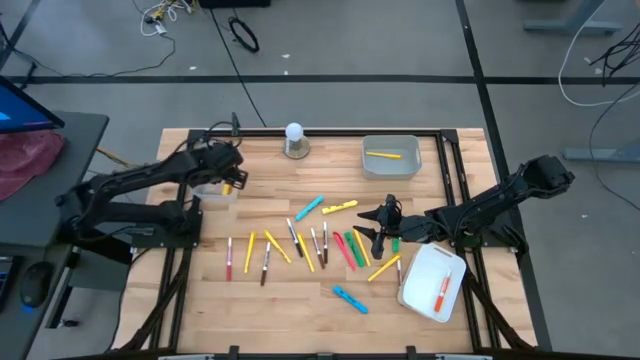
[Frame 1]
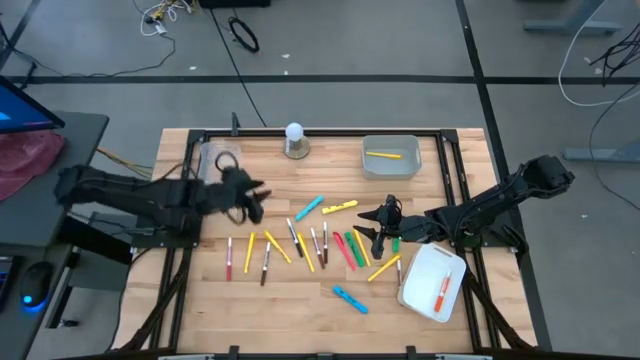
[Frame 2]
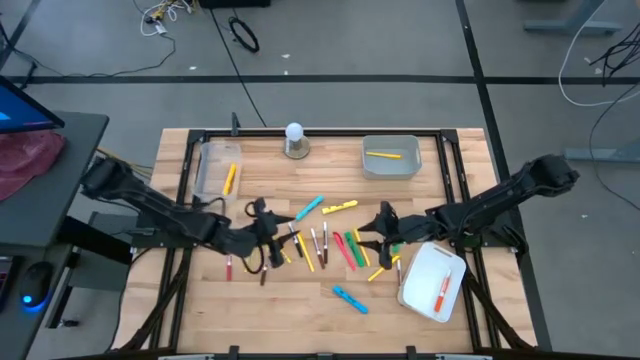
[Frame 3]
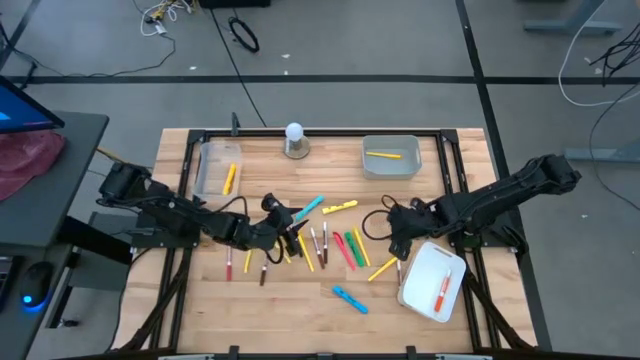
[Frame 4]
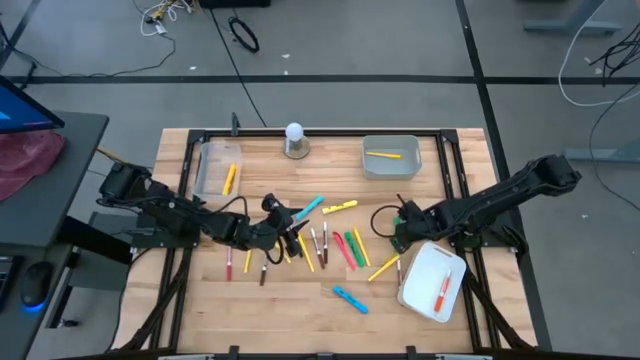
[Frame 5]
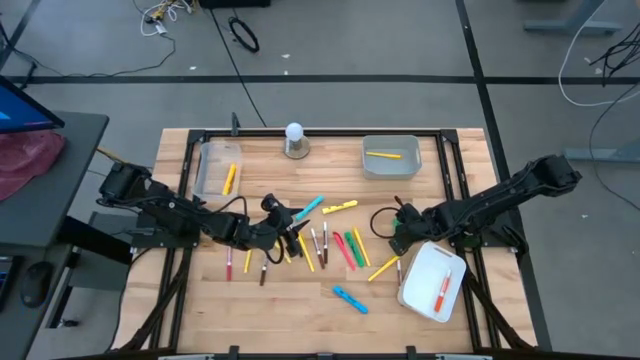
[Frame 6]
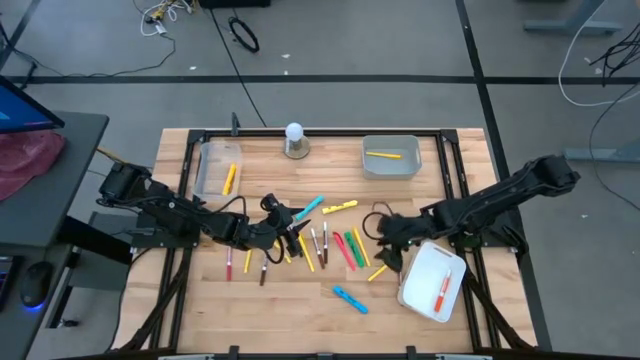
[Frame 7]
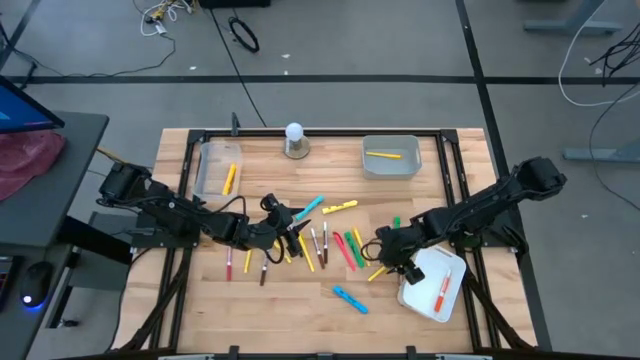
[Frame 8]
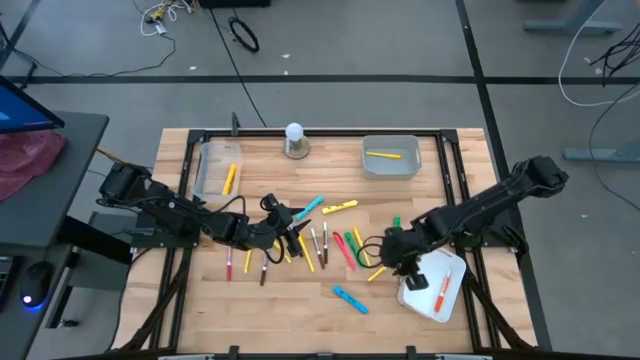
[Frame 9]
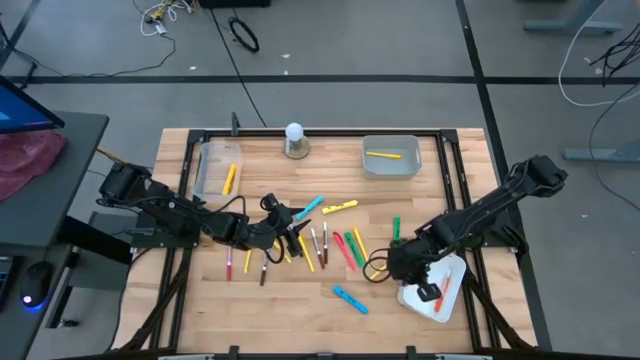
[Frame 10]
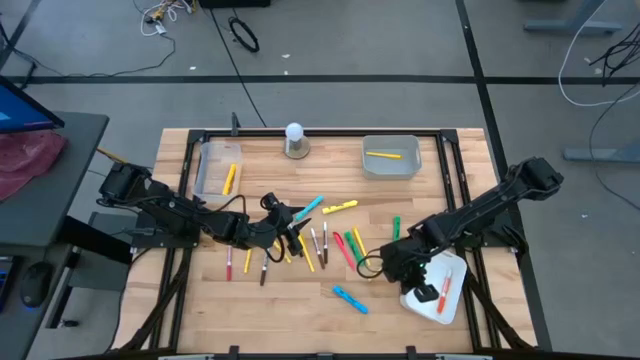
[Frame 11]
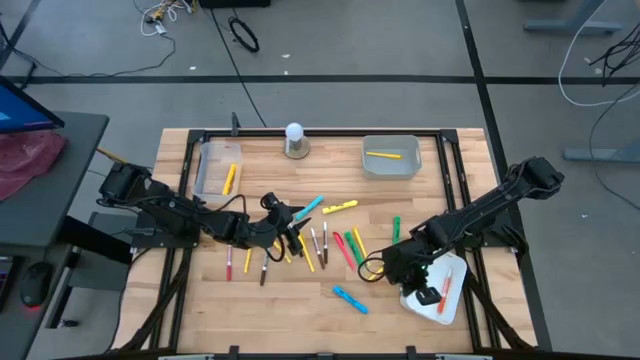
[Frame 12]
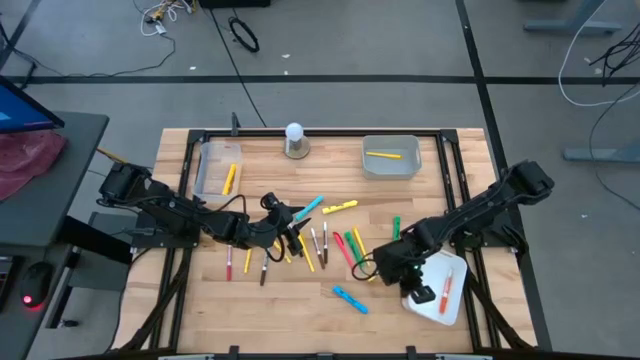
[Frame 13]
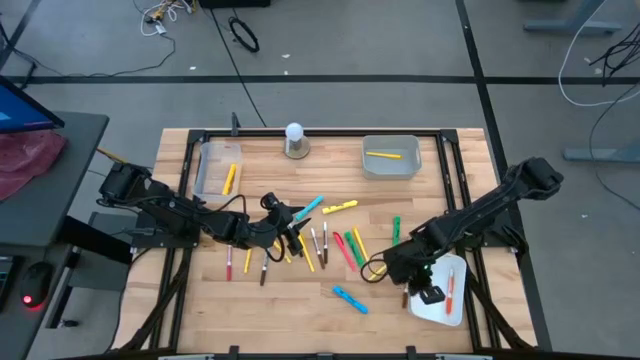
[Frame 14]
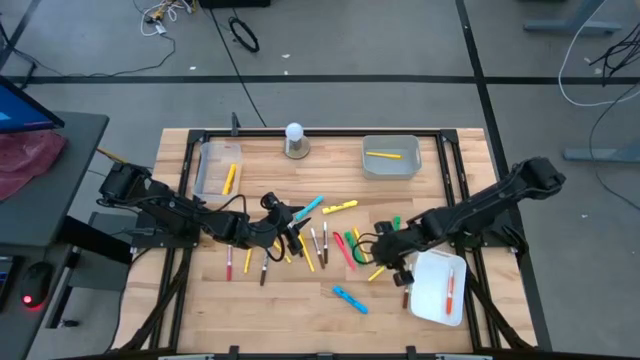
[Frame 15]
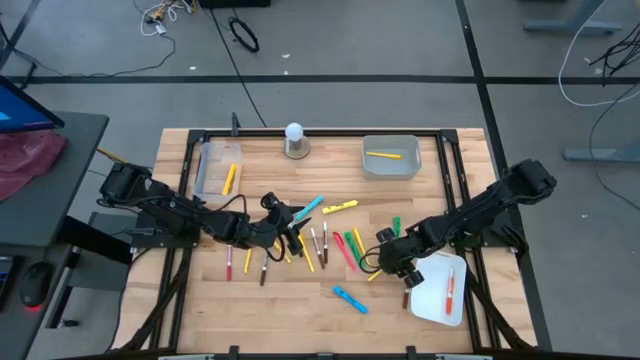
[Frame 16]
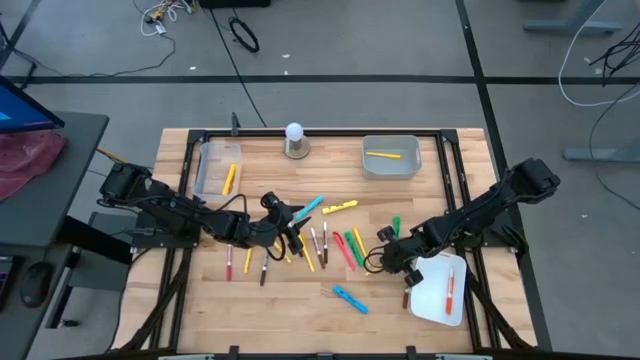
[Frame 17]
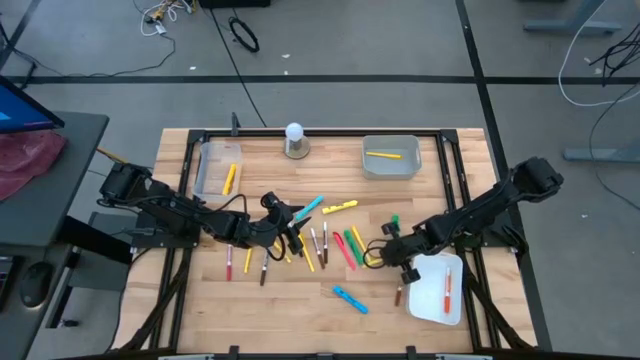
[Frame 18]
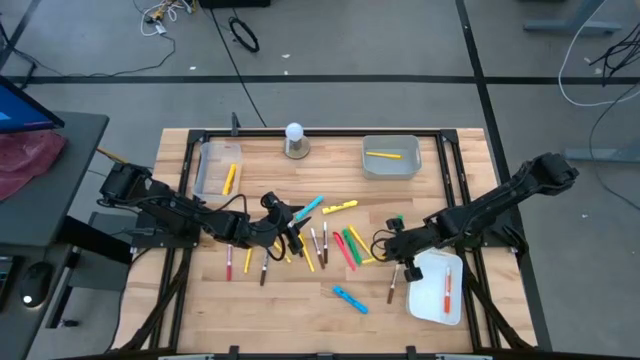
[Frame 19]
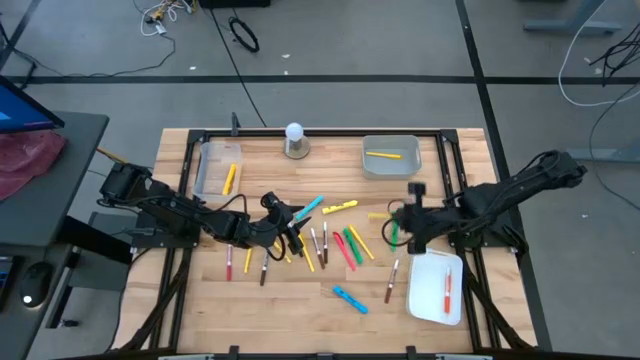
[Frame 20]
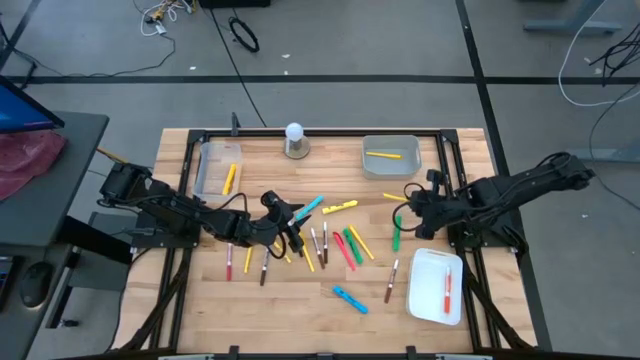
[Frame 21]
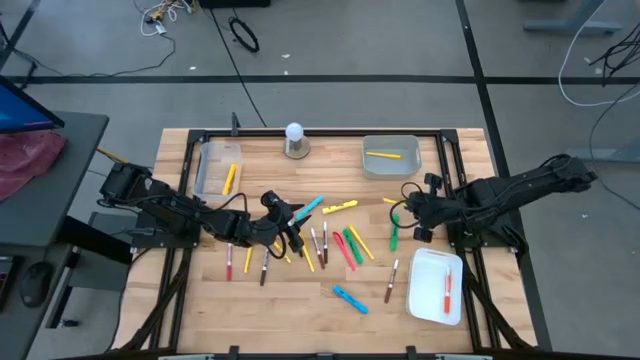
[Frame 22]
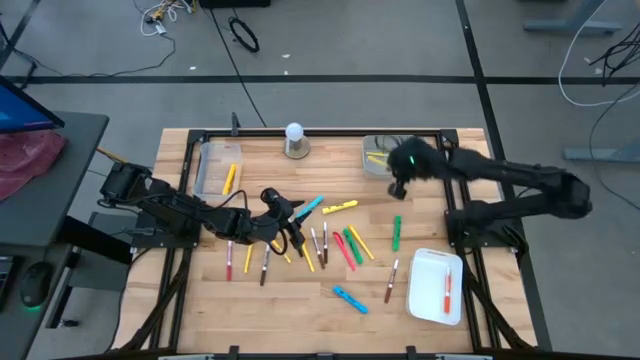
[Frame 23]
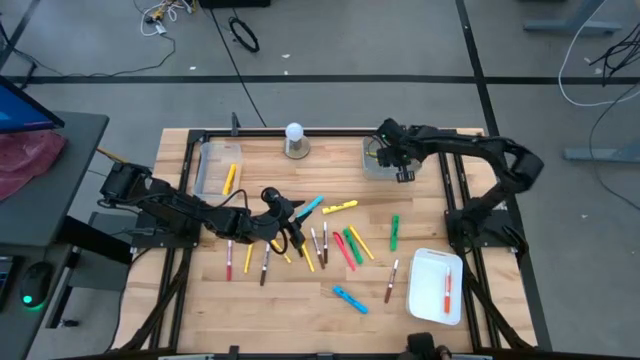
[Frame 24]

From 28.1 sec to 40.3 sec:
Task: Pick & Place Markers
Put the yellow pen into the gray bin

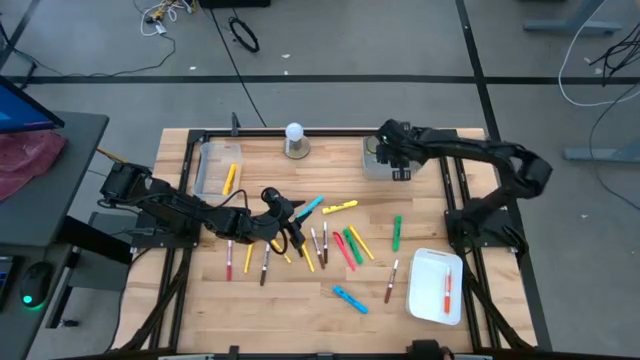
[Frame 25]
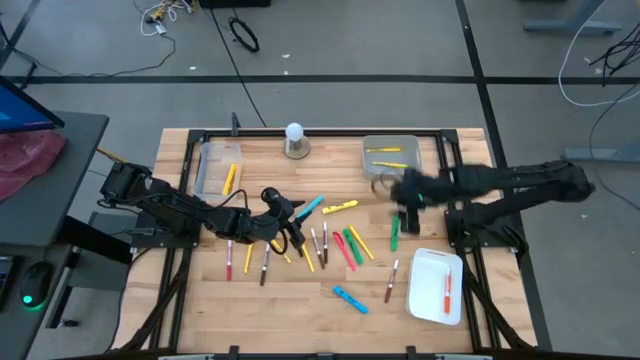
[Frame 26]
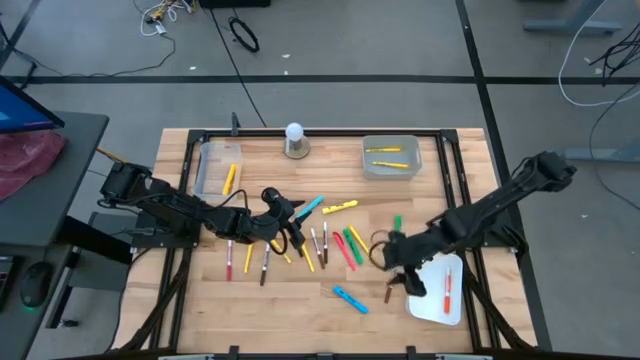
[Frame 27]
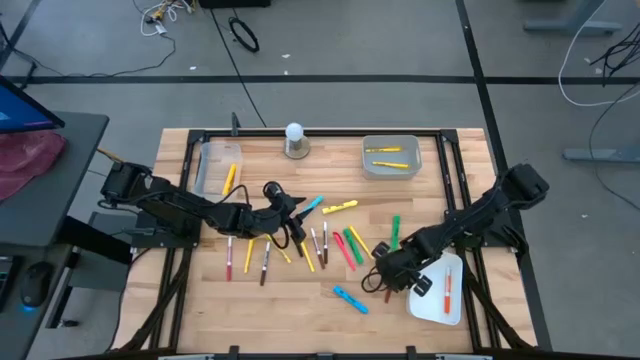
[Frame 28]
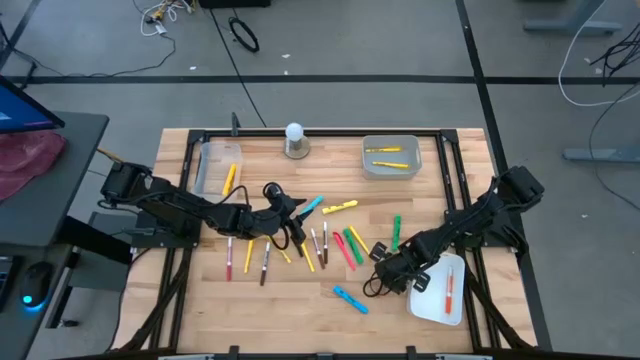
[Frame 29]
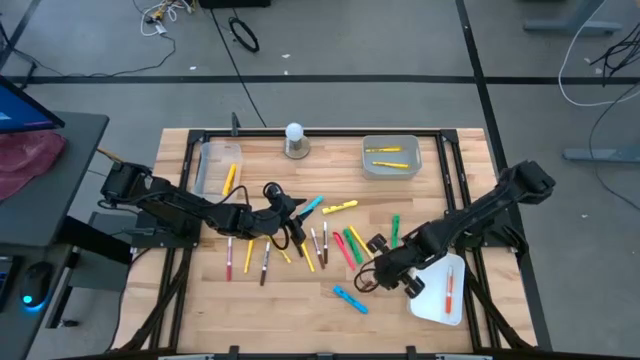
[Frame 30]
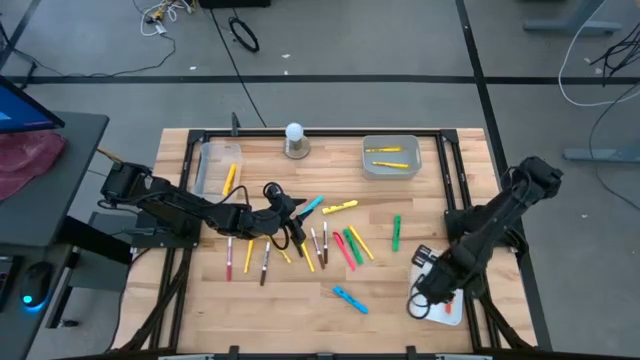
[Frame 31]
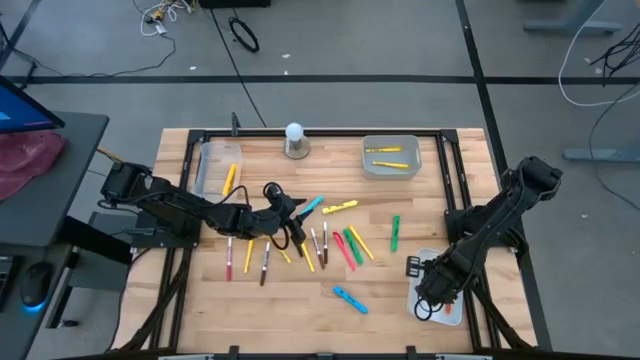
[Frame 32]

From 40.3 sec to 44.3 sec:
Put the brown marker into the white bin

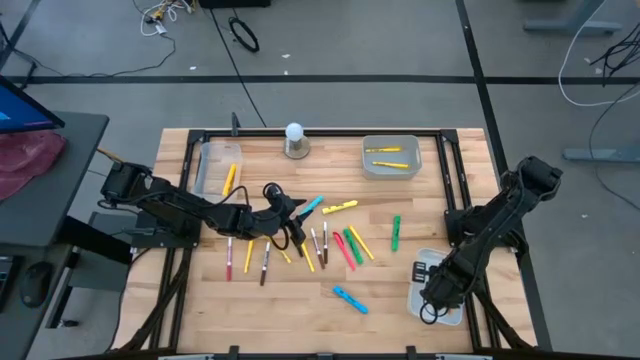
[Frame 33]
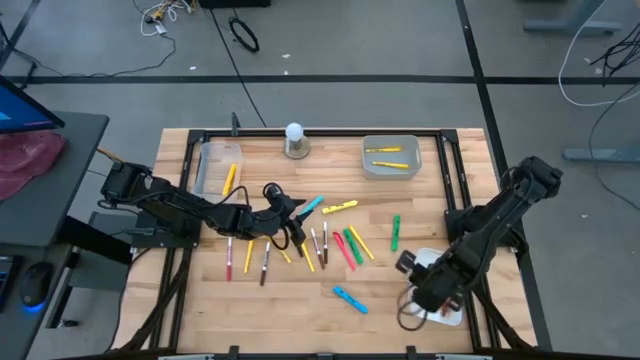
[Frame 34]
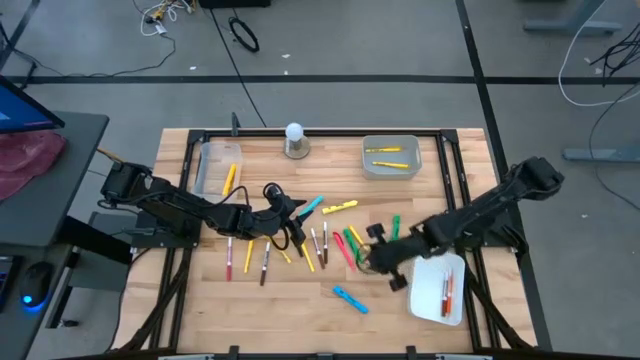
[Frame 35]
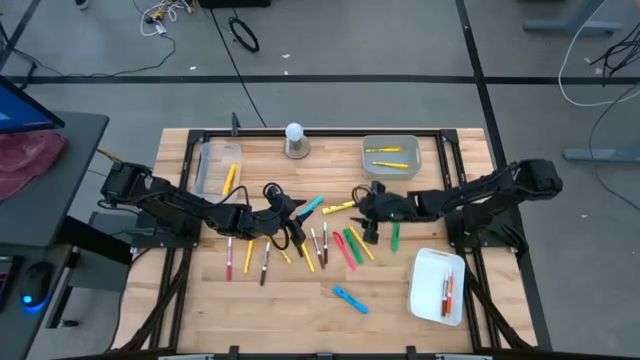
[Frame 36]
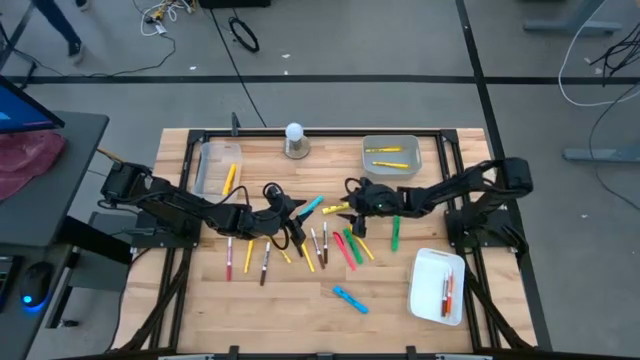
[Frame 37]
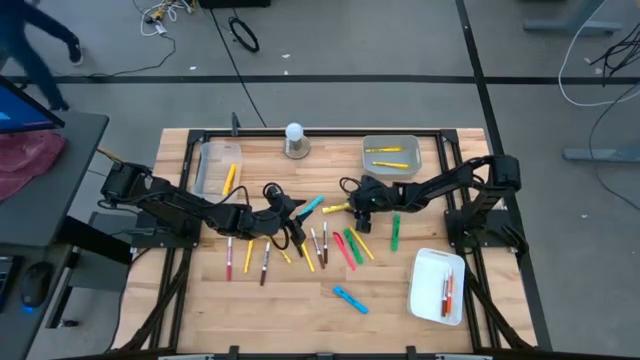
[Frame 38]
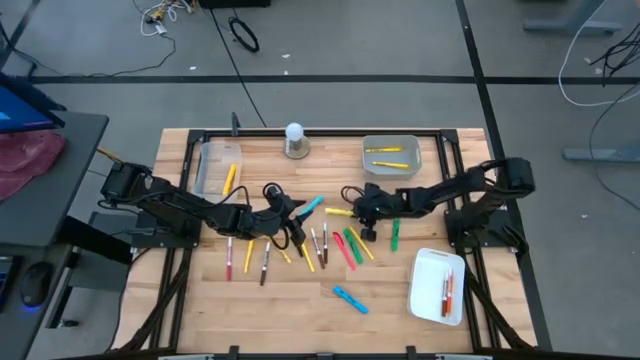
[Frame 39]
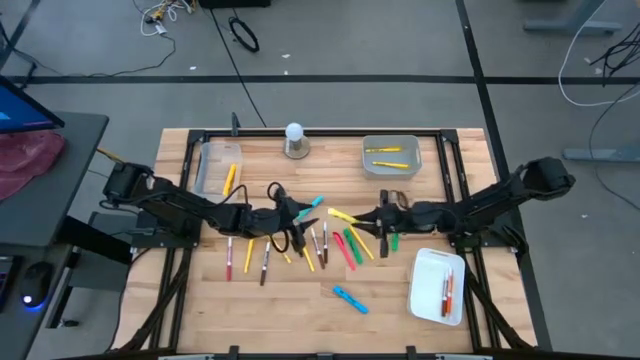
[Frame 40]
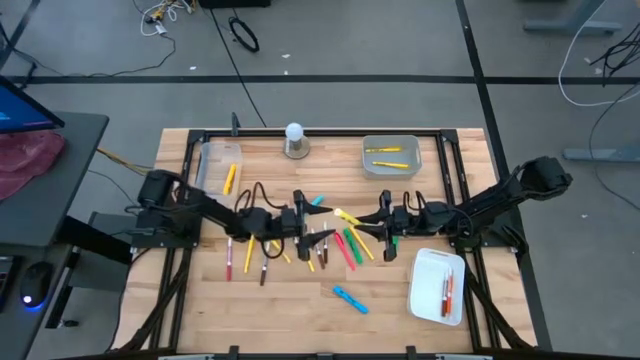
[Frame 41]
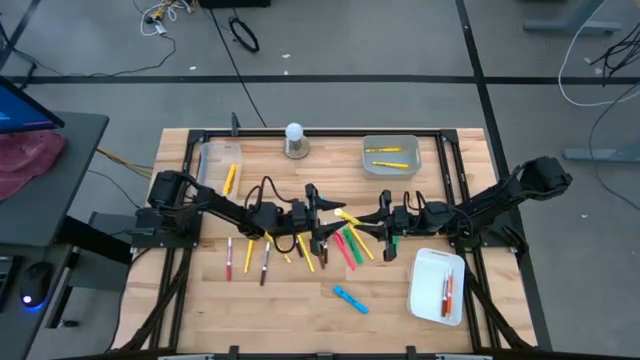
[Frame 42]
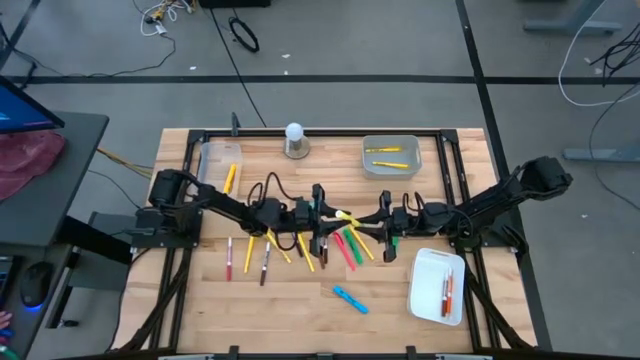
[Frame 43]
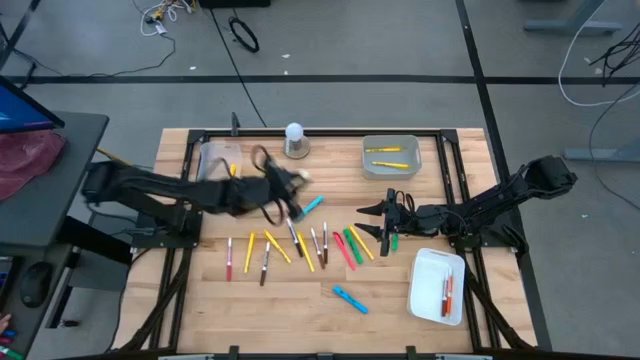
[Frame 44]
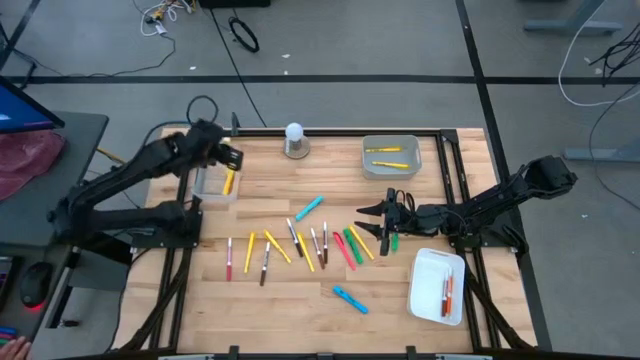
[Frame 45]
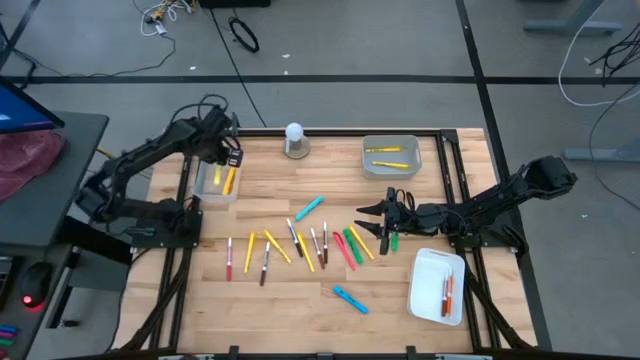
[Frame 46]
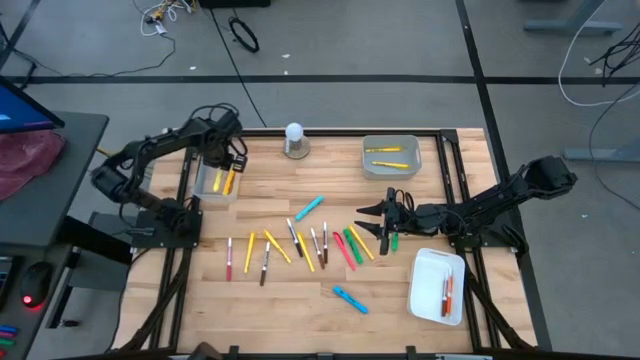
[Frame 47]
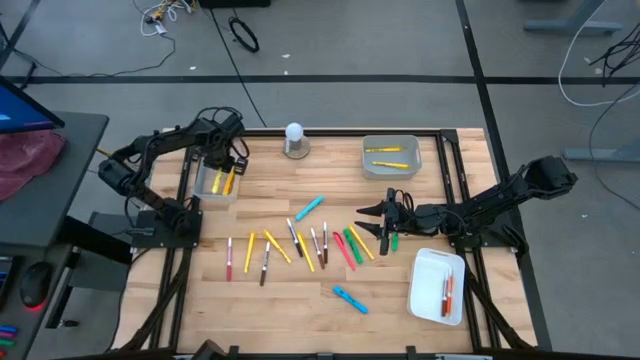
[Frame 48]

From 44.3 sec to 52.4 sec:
Put the light yellow highlighter into the transparent bin
